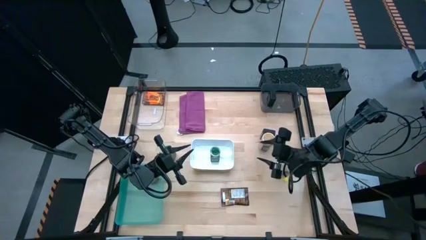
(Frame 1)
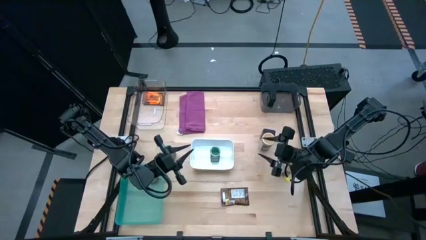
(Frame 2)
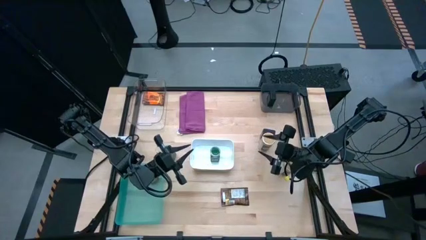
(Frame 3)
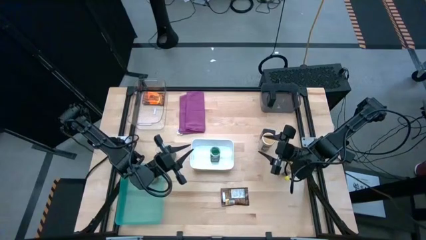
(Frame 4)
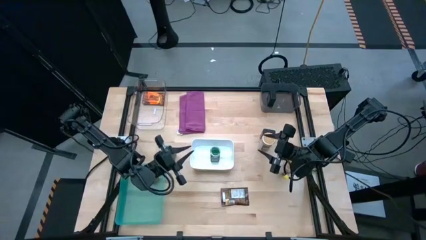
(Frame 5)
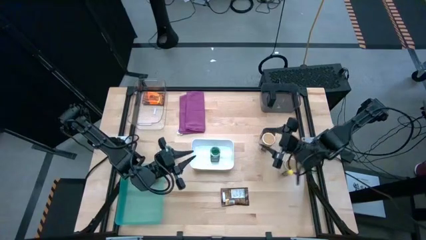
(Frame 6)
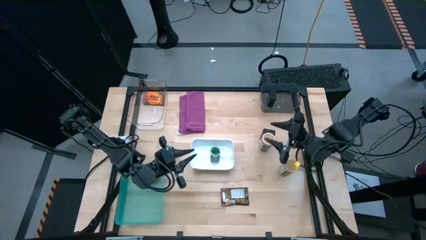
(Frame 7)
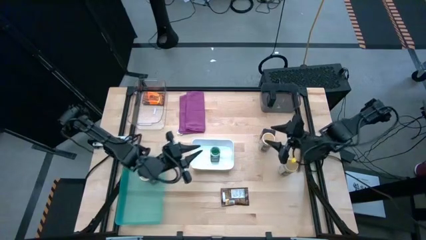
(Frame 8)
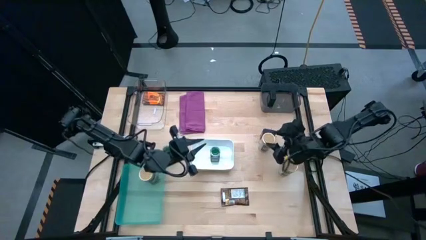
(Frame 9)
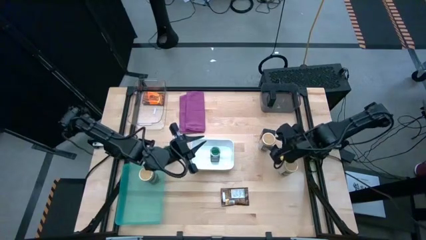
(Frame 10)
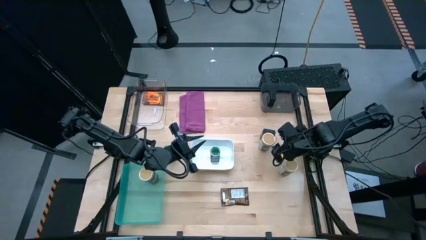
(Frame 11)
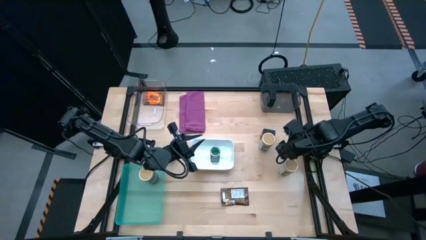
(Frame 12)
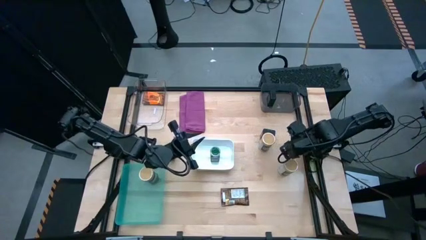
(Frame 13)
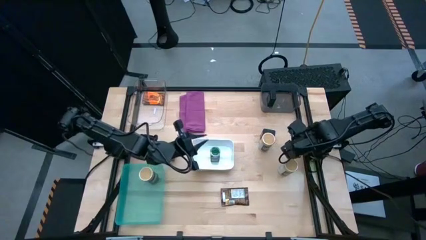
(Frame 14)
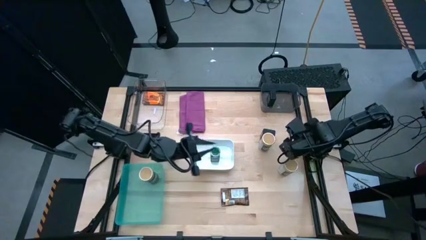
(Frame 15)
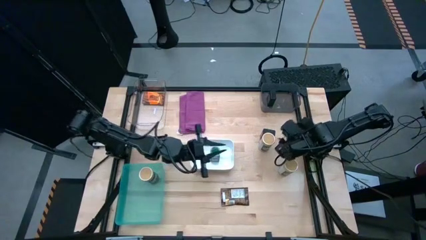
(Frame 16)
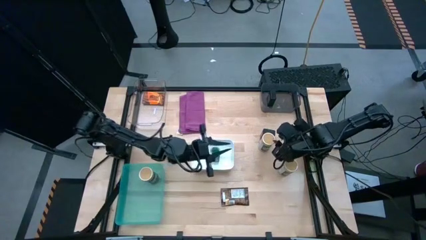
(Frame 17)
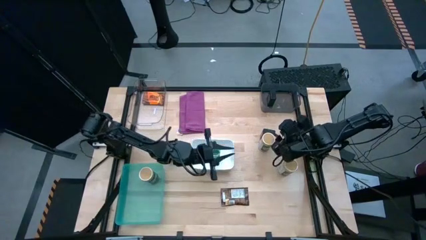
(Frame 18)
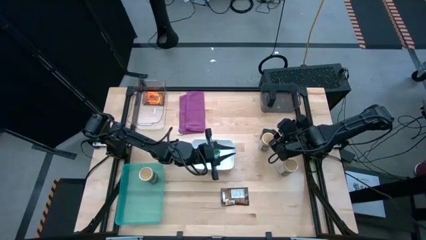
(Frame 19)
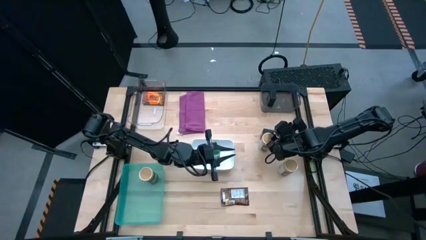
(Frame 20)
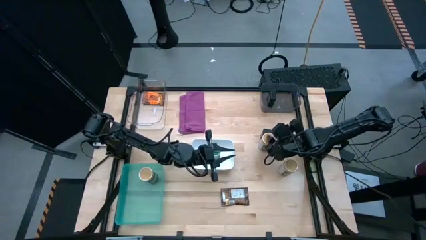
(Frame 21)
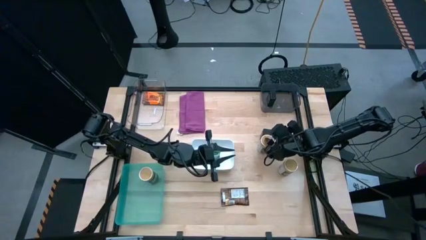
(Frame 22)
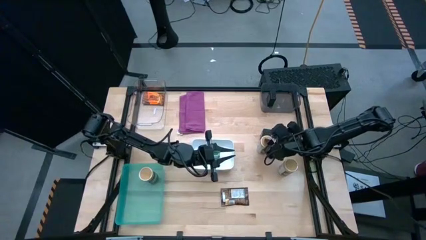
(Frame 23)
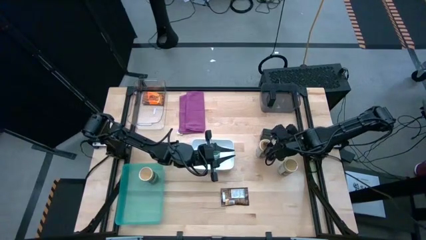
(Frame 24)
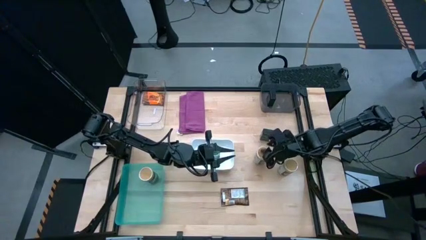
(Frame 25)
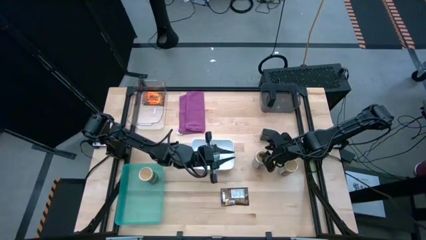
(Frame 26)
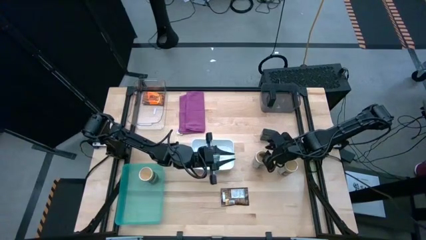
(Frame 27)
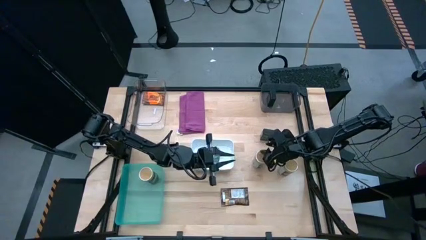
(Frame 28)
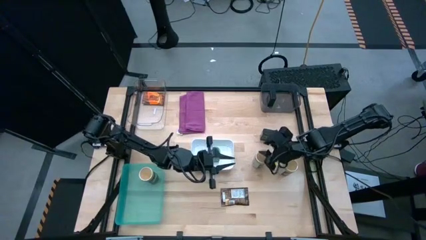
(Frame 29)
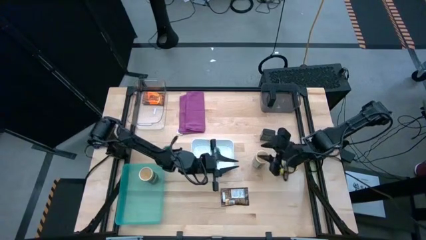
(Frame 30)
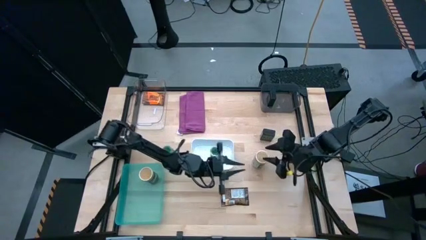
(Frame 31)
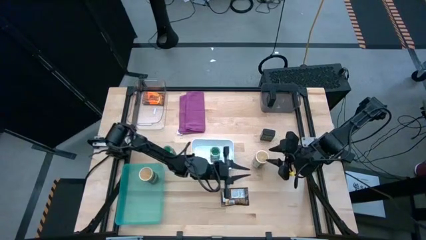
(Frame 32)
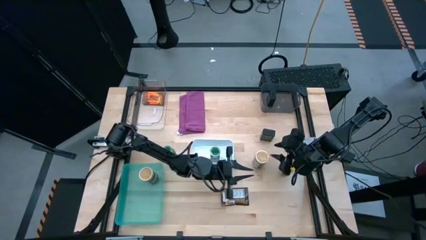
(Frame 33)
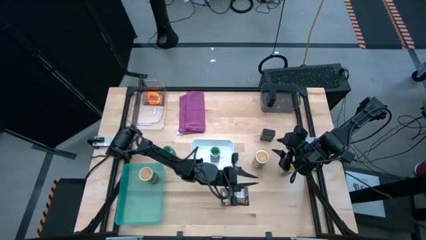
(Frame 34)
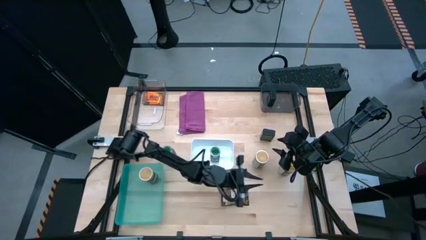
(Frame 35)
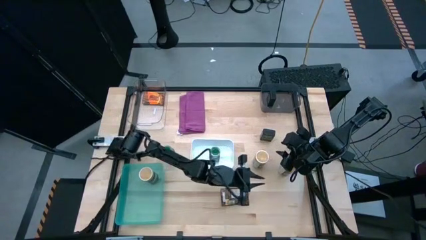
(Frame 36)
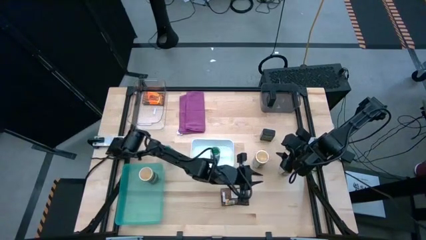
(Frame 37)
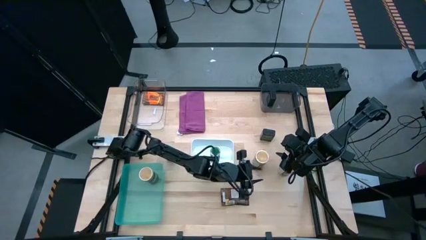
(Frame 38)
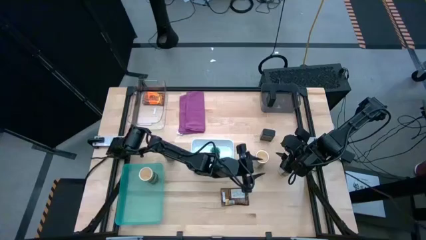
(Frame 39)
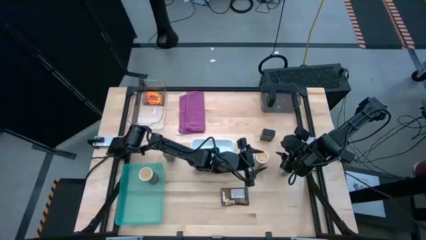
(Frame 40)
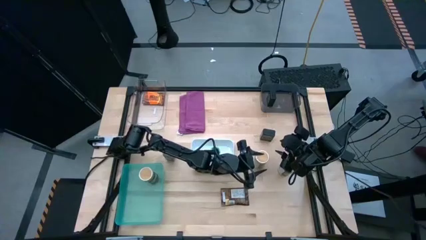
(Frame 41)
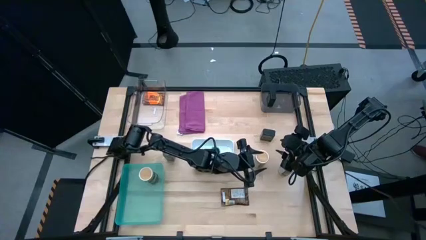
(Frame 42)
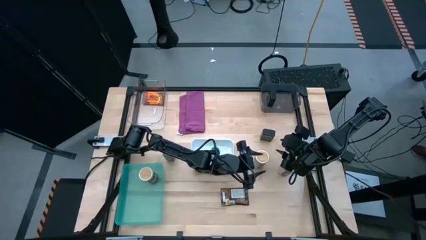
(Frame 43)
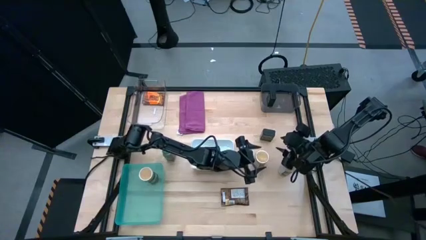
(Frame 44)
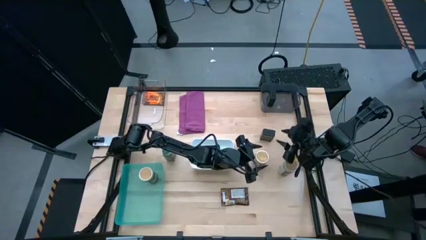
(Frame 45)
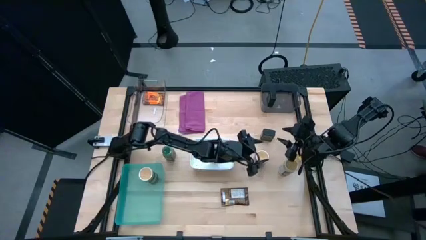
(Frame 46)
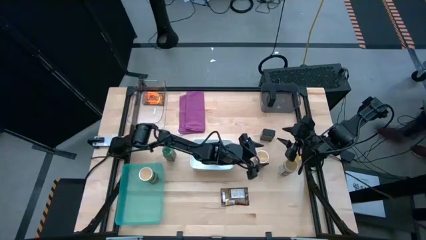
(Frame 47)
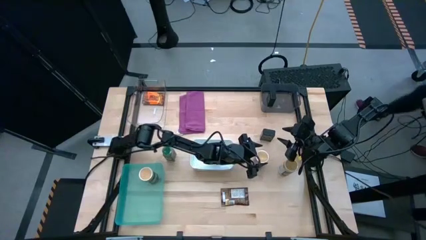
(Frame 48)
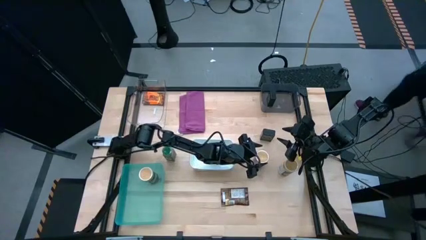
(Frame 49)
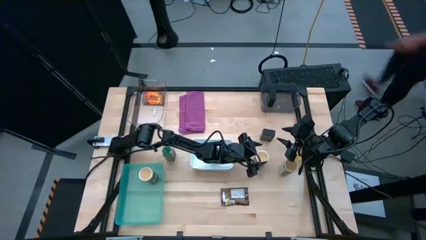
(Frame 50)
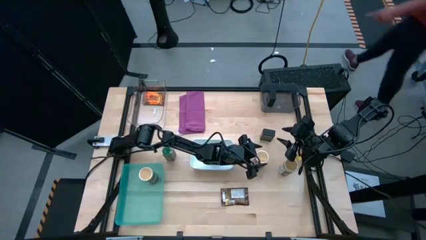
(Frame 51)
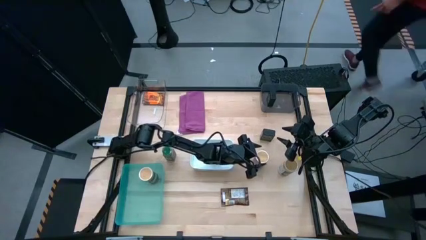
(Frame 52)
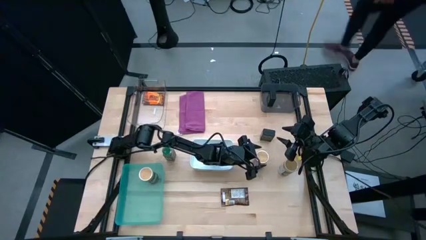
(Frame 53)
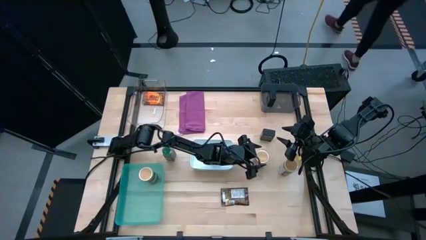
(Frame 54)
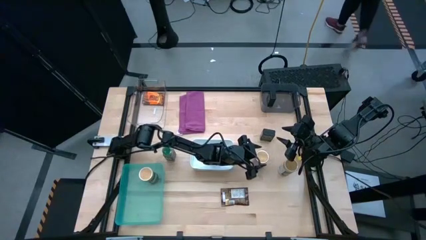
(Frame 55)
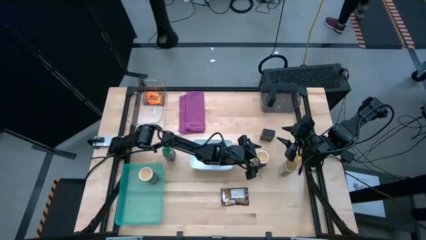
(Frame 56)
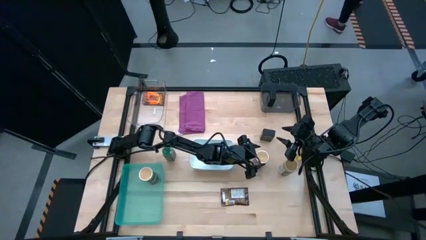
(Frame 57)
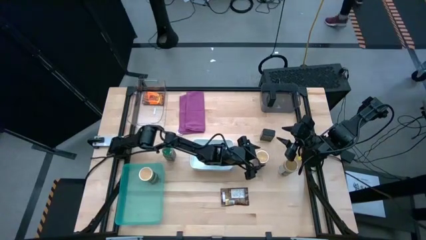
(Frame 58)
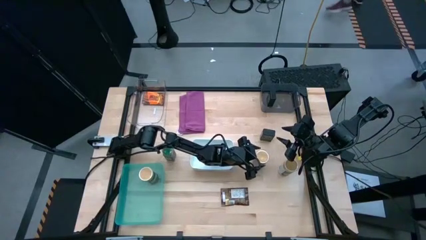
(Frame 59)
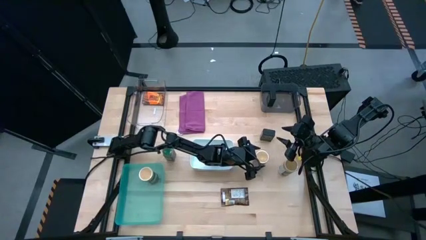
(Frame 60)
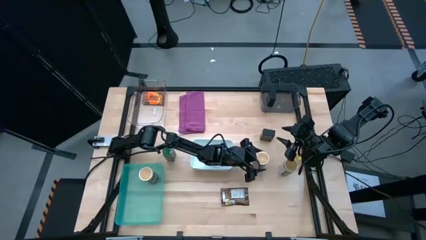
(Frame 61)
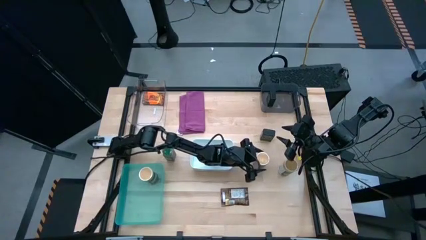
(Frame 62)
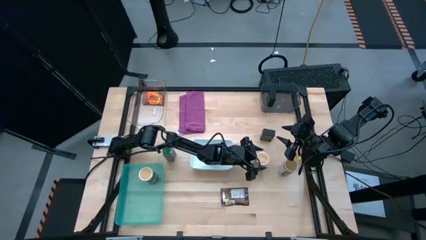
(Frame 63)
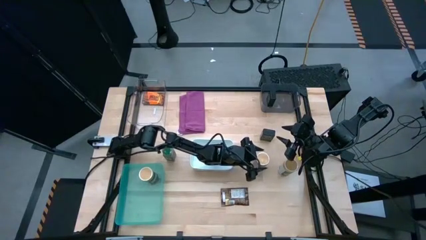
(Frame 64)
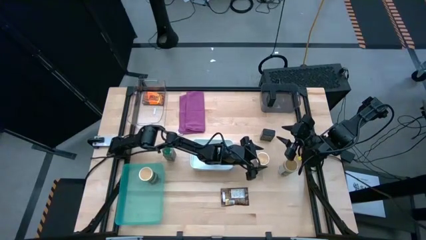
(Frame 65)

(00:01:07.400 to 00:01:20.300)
Task: Sort spices by type
Put the top brown seasoning bottle into the blue bin
